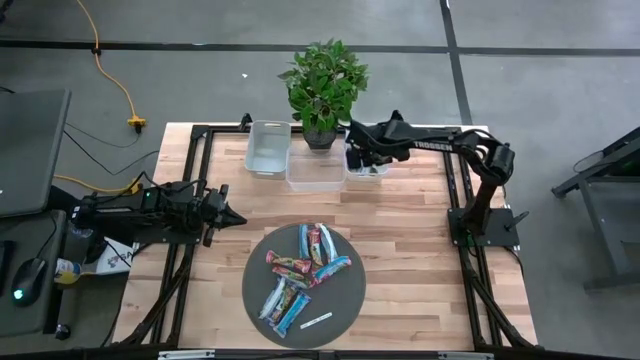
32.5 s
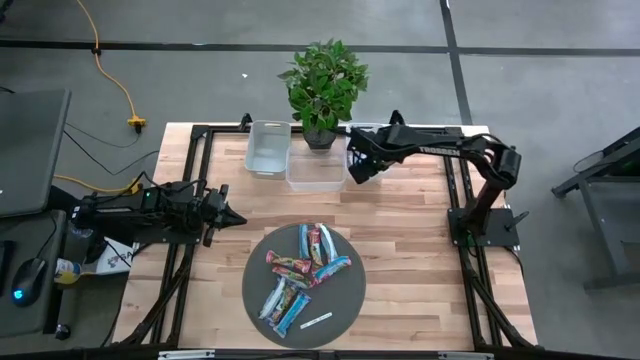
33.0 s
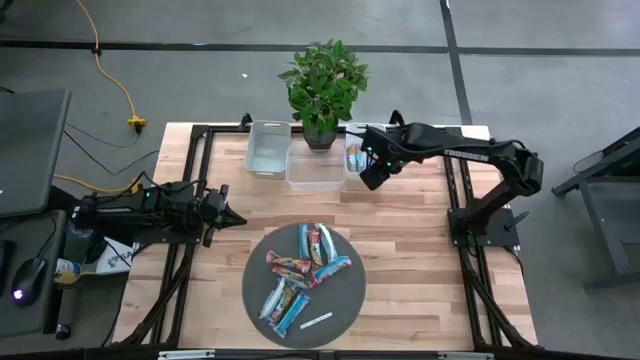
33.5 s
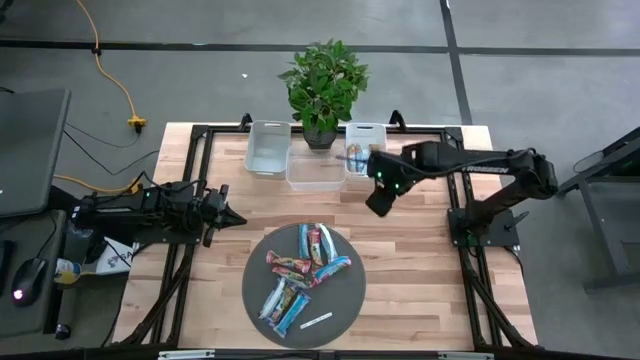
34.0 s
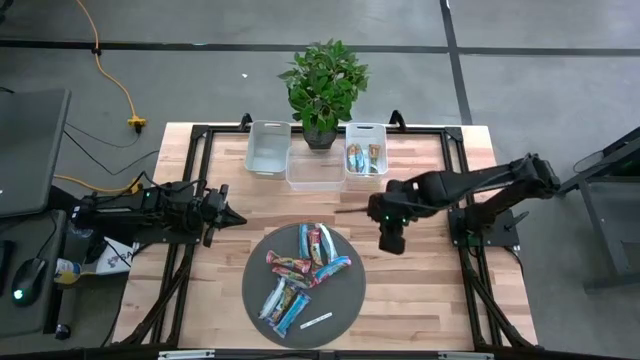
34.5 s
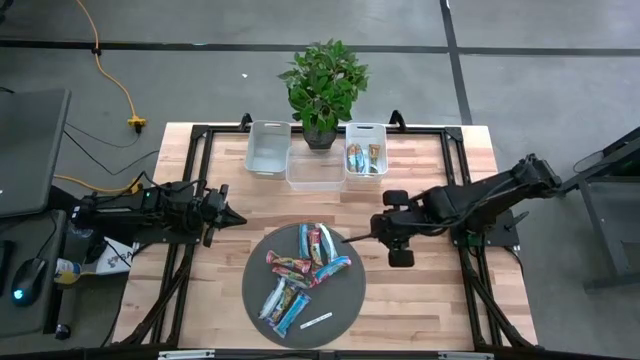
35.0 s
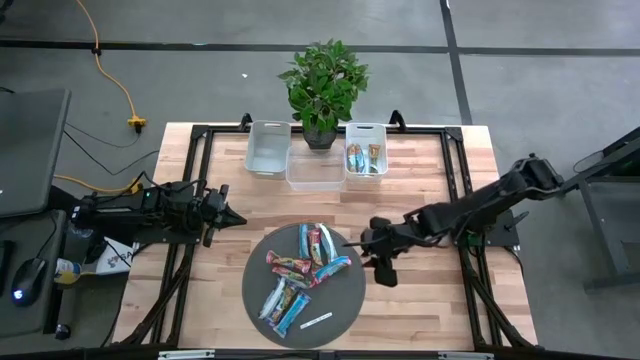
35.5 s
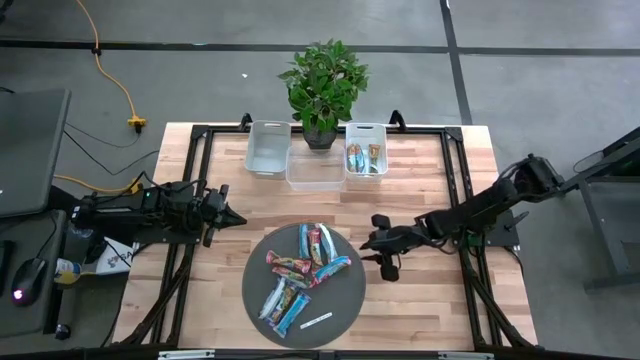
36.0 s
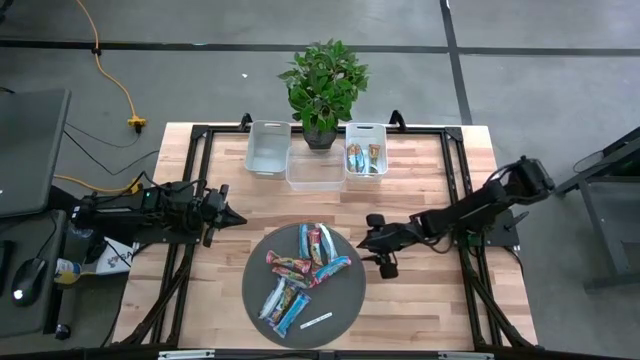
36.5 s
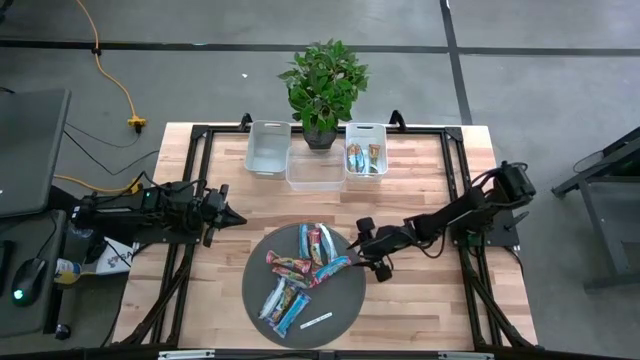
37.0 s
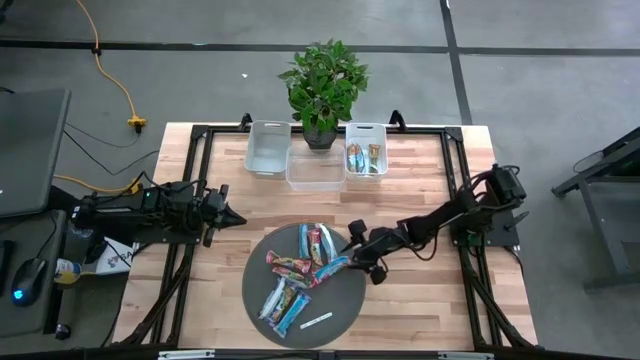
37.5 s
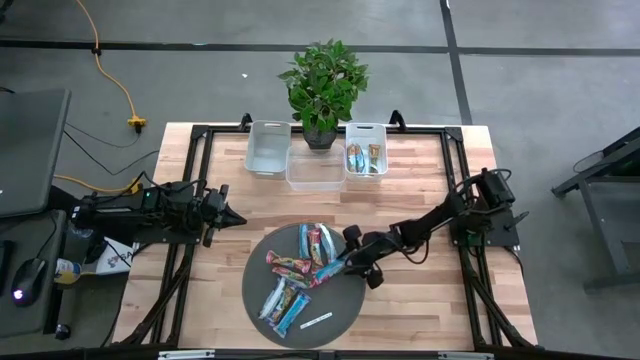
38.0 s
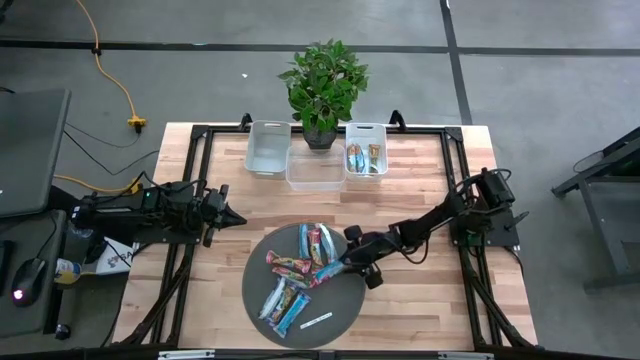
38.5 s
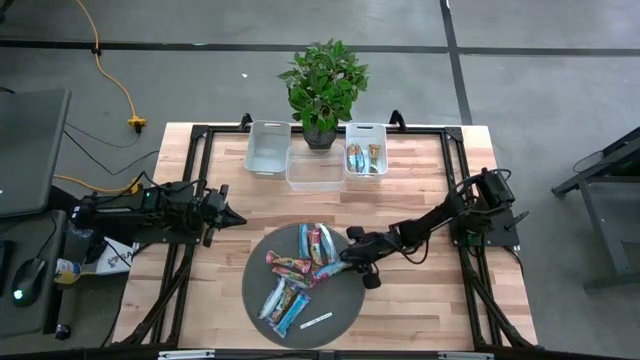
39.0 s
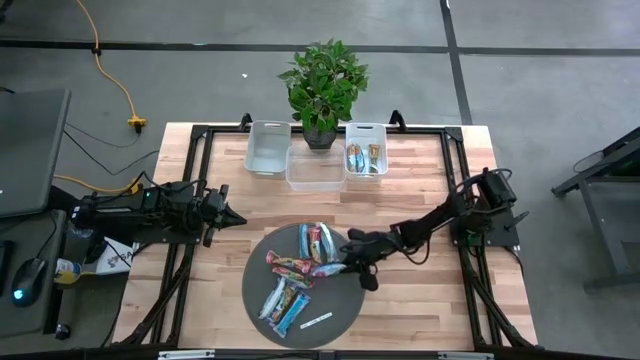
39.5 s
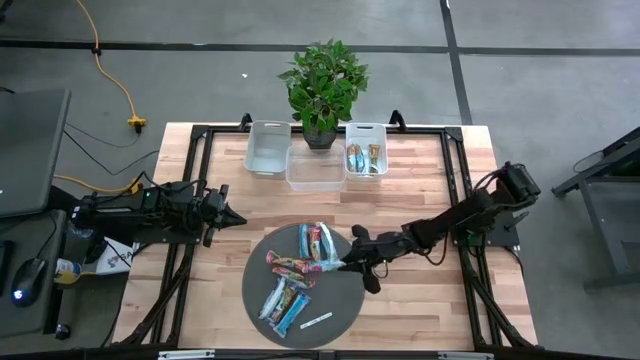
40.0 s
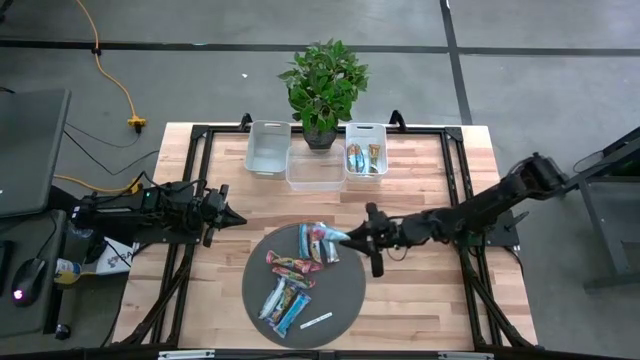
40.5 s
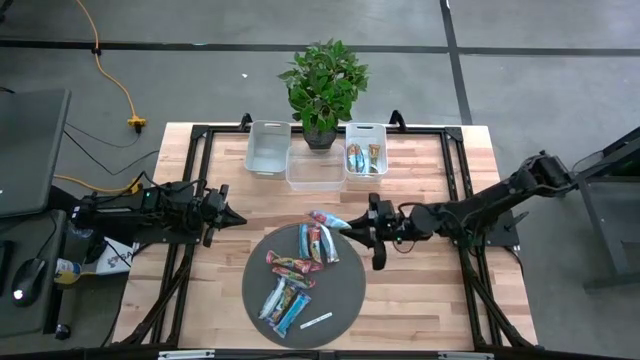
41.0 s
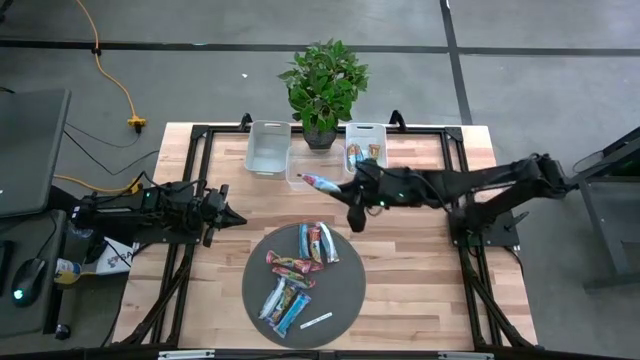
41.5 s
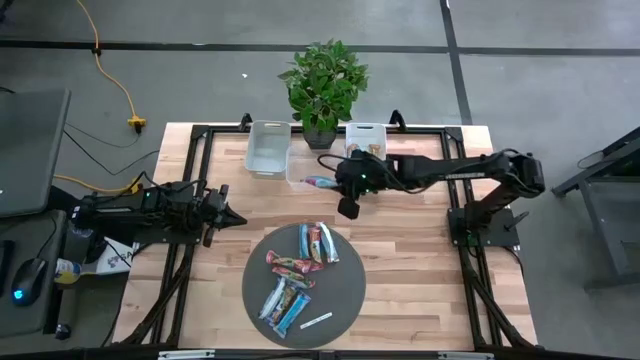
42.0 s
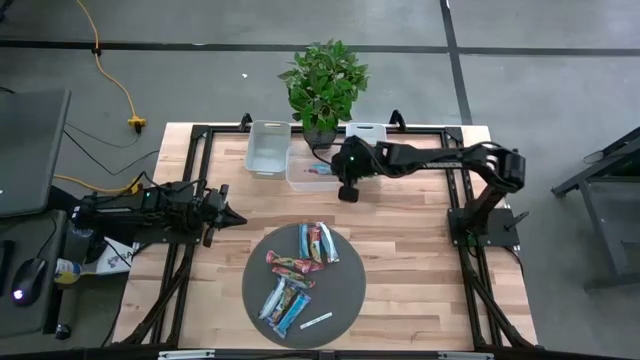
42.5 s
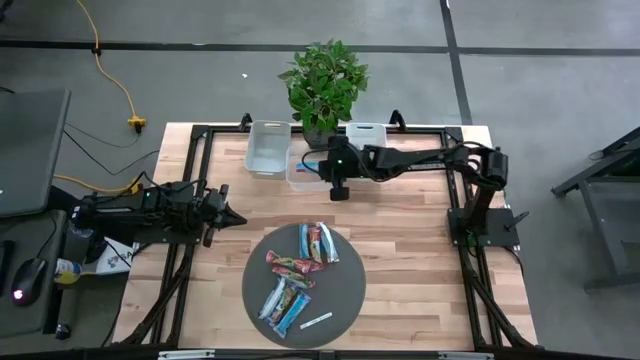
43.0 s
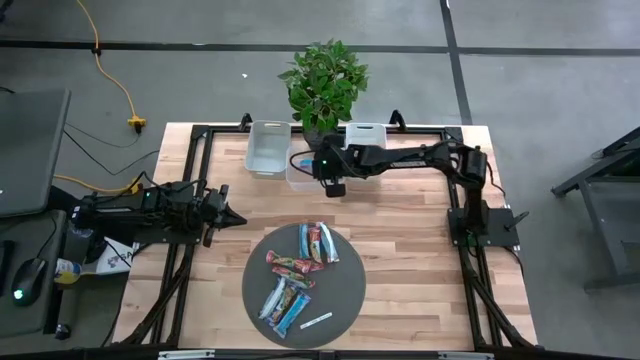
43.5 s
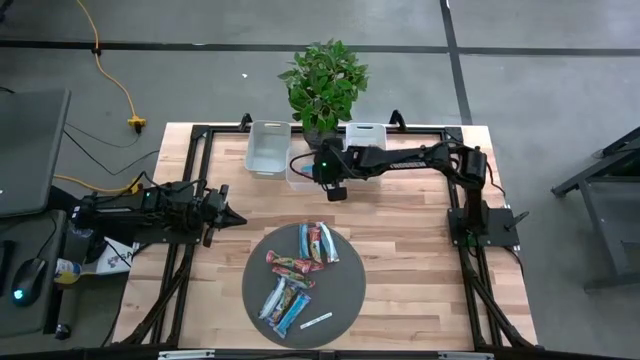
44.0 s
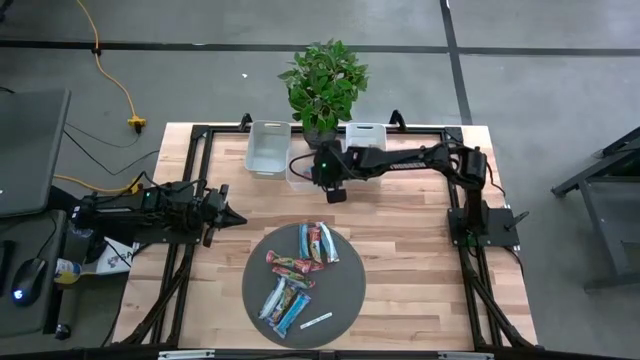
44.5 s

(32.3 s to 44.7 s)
Task: Pick and place Granola Bars by type
Put the red granola bar into the transparent bin

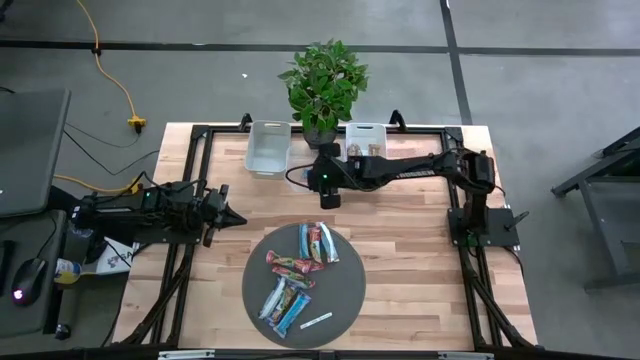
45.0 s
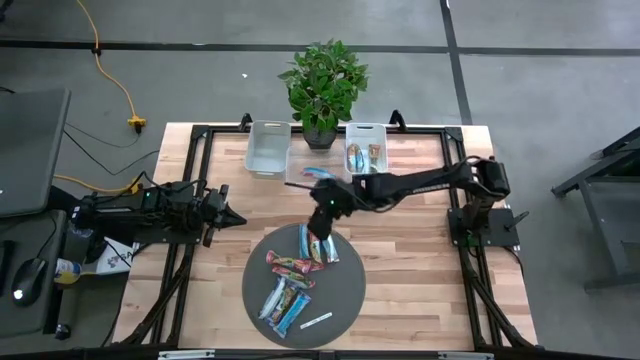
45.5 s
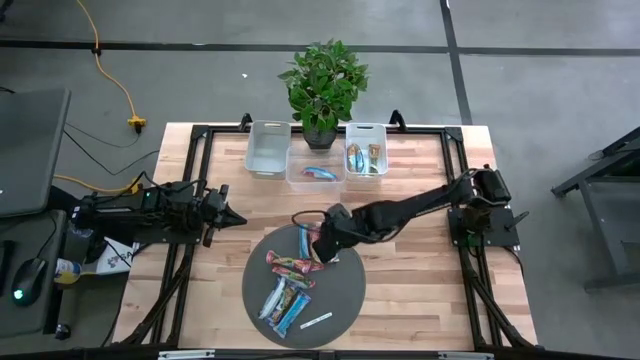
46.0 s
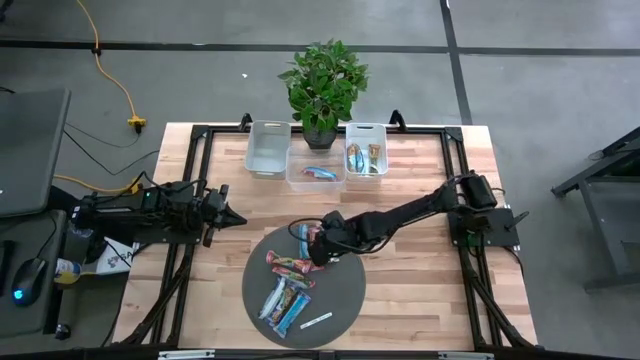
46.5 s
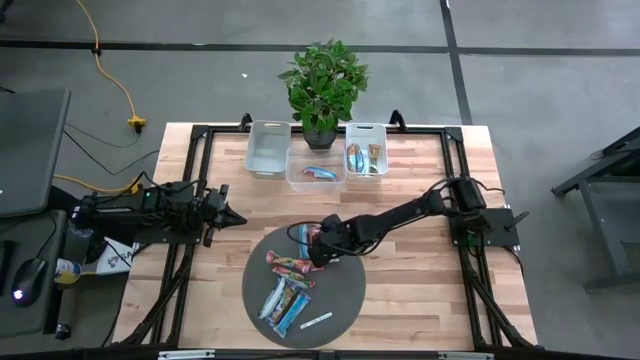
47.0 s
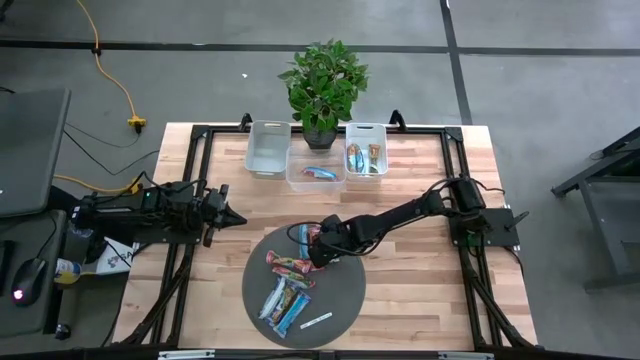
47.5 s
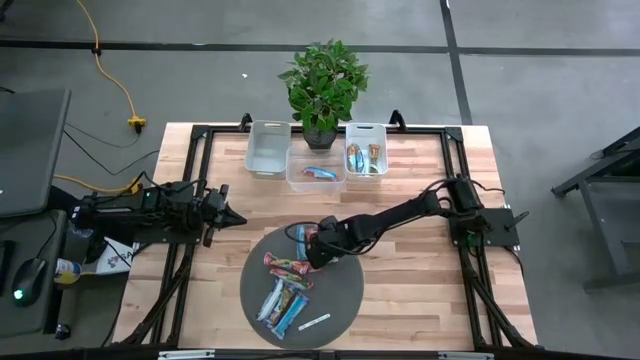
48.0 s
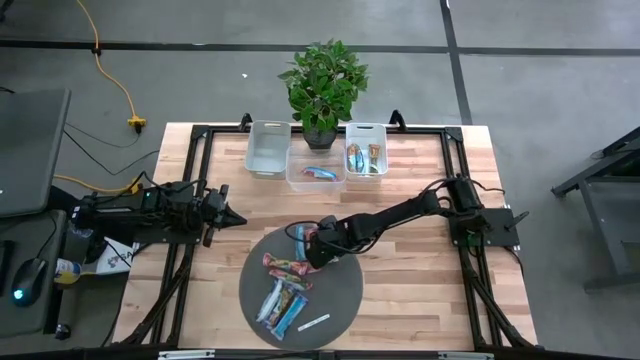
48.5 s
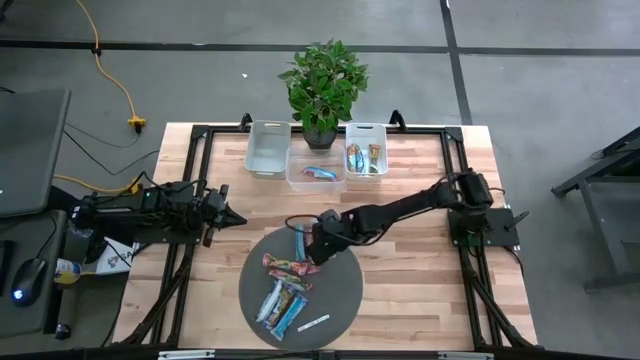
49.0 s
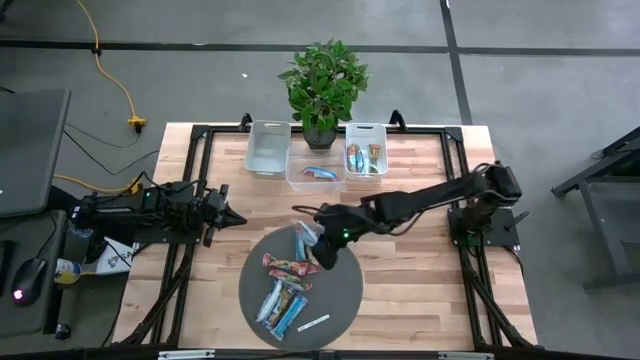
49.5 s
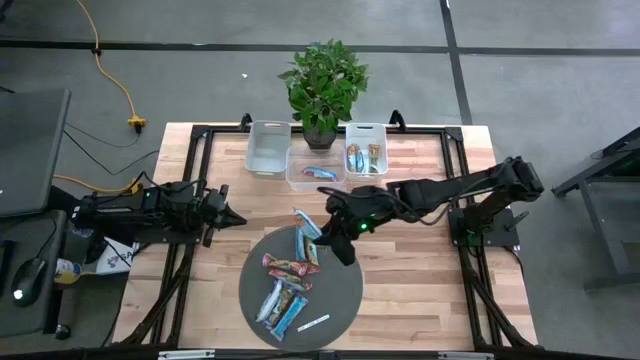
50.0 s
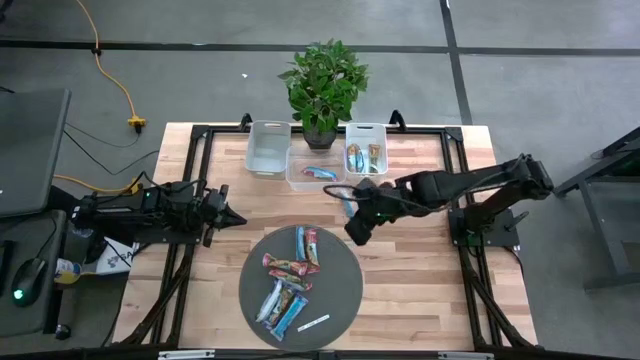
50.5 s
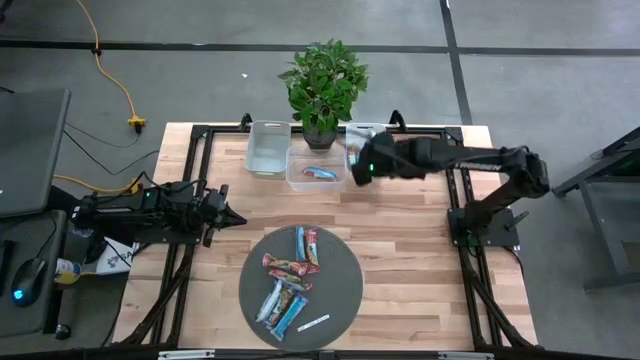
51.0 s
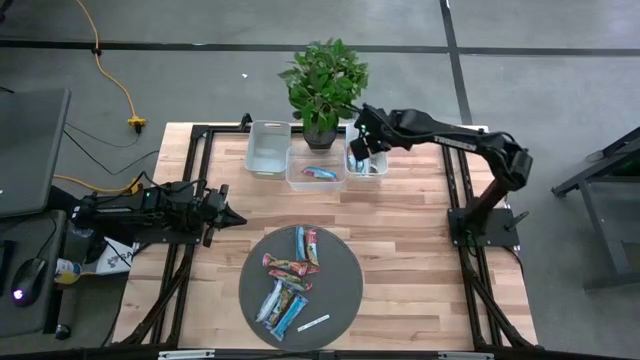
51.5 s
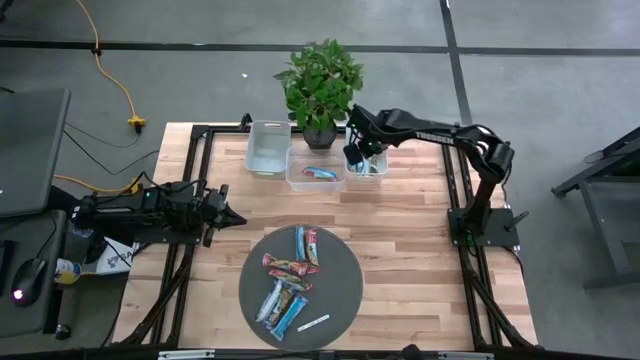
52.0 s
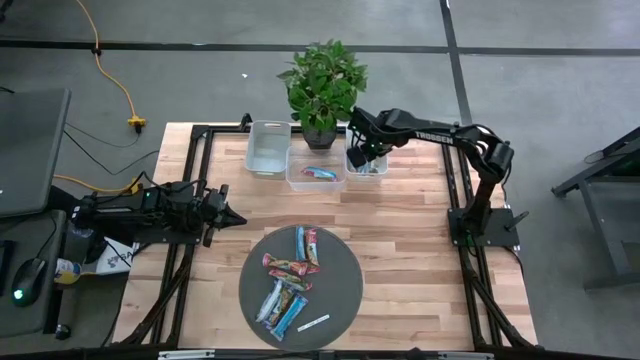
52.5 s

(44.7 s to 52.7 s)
Put the yellow granola bar into the white bin
